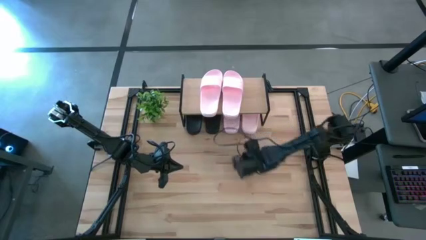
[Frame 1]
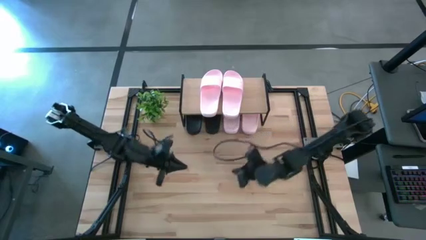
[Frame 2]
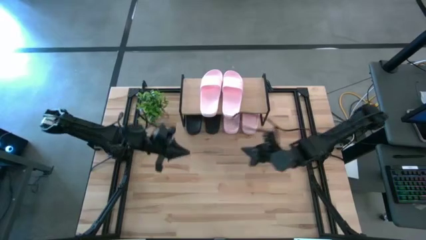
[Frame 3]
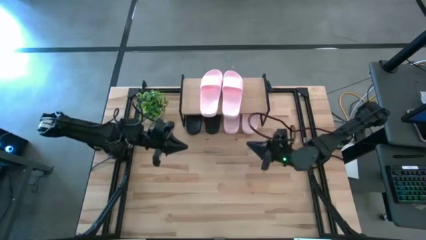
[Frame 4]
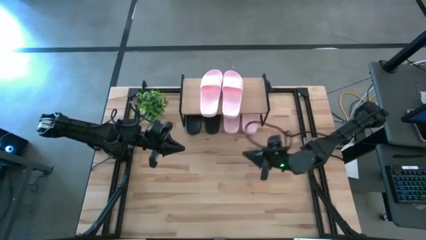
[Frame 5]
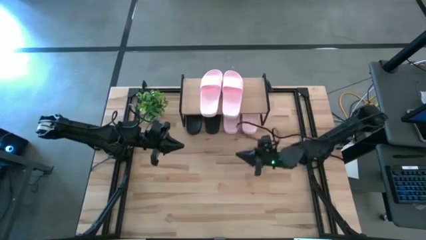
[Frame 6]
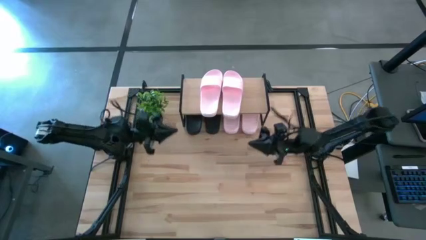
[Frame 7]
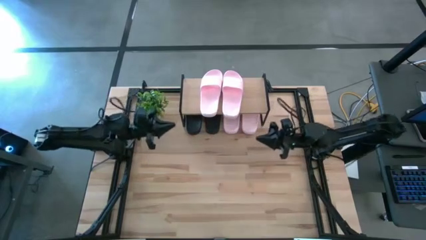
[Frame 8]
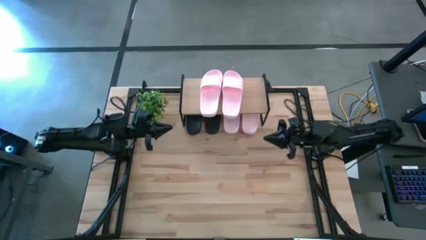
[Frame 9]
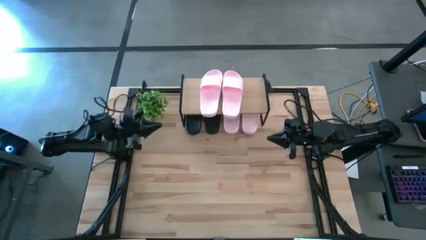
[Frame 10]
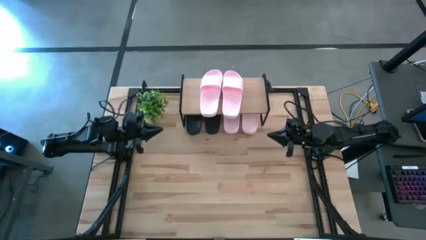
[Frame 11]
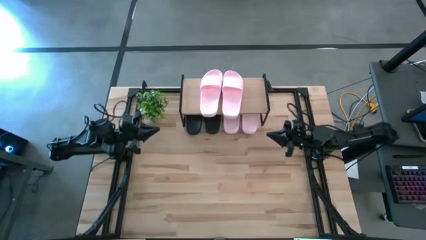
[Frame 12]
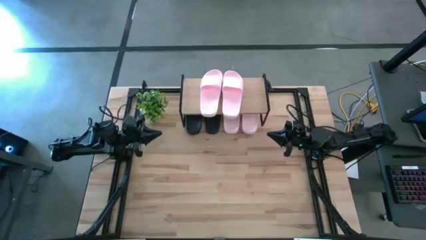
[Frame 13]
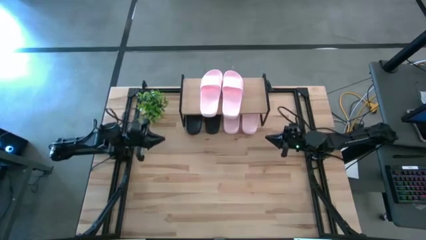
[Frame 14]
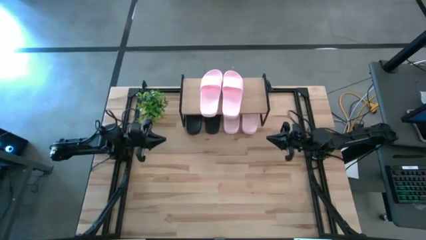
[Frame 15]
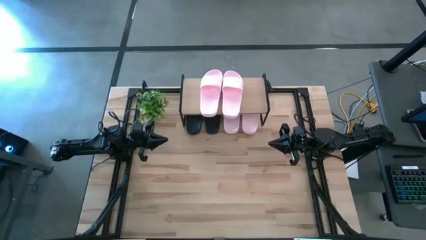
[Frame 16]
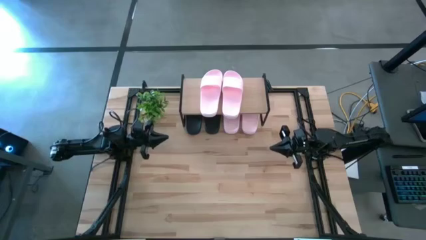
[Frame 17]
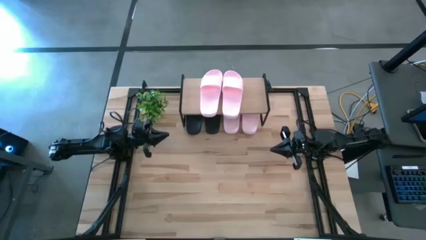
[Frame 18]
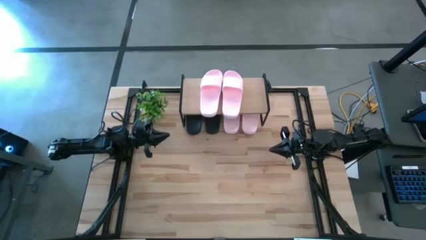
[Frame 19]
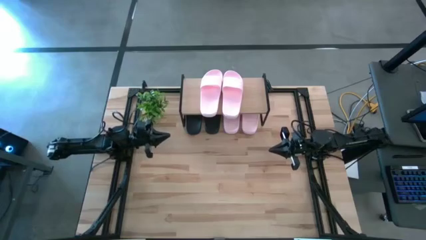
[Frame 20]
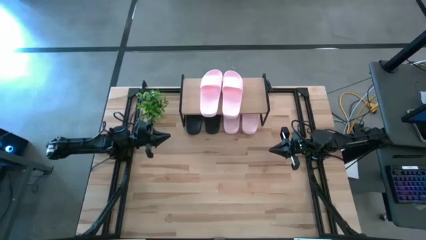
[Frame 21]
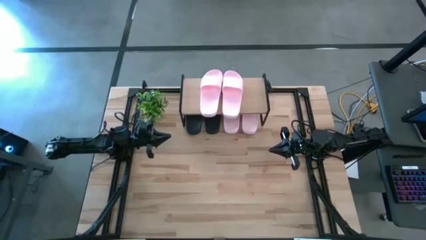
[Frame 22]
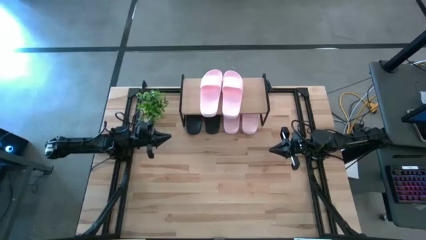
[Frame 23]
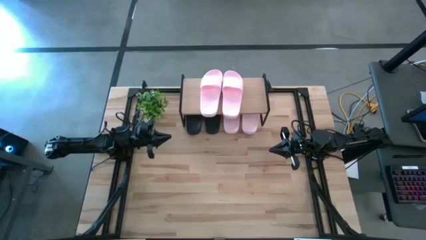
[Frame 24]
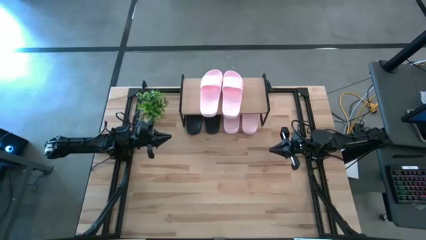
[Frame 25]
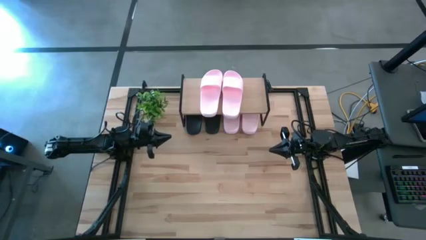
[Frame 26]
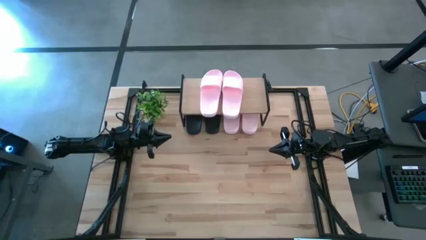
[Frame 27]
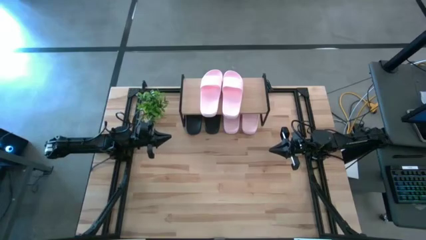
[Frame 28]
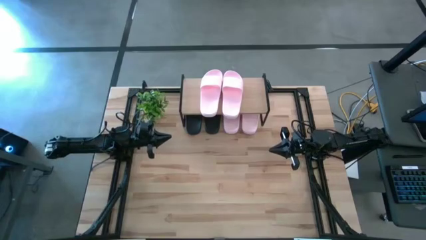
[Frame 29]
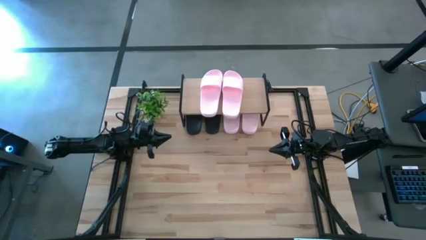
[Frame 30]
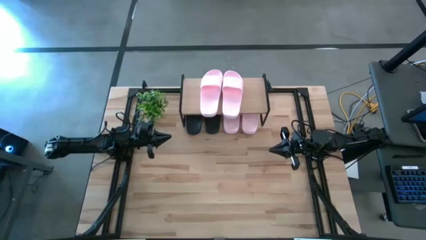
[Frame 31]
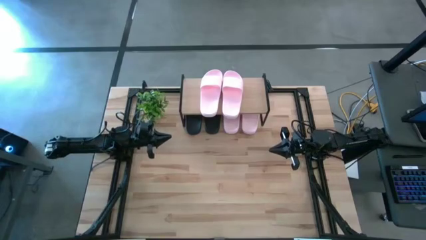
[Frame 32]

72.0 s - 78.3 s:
Task: Pick and place slides into the shelf
Return to Home Position

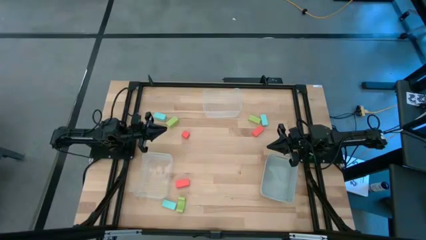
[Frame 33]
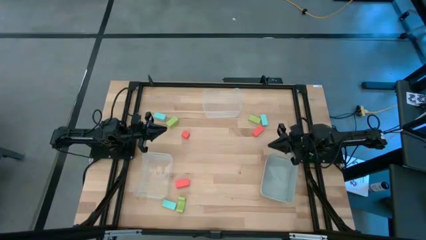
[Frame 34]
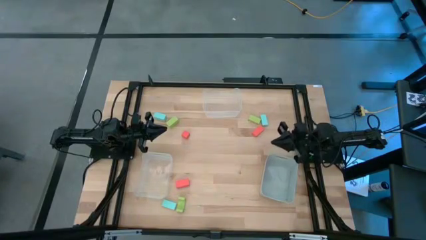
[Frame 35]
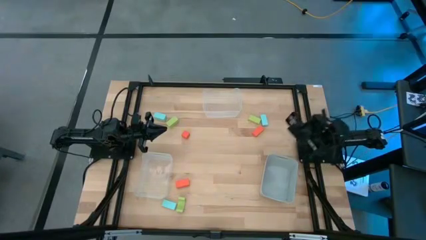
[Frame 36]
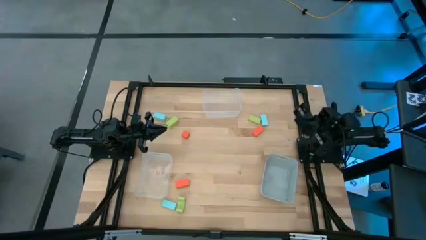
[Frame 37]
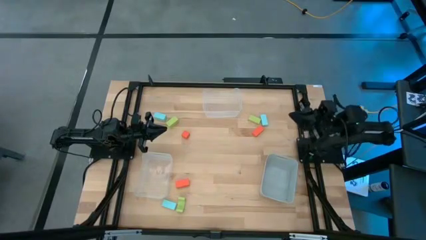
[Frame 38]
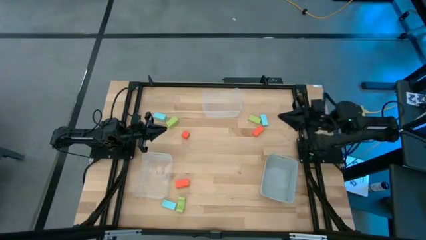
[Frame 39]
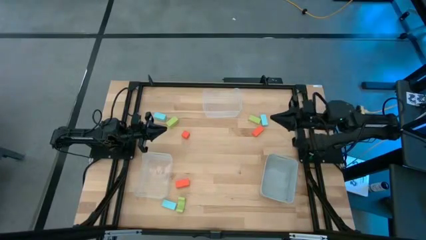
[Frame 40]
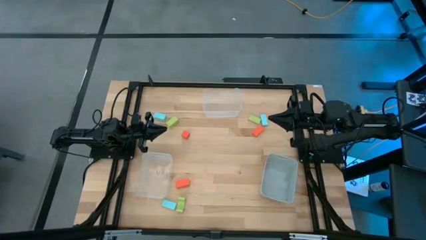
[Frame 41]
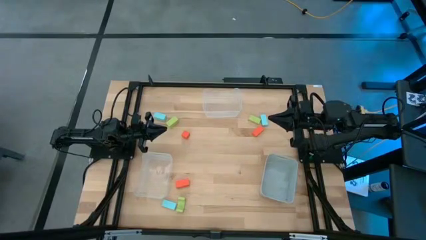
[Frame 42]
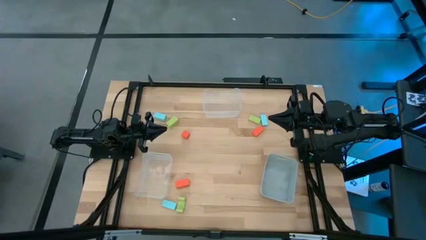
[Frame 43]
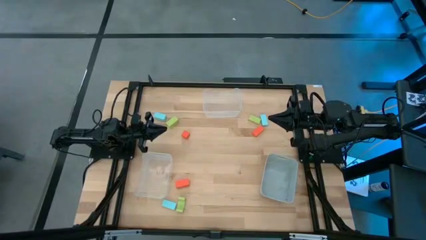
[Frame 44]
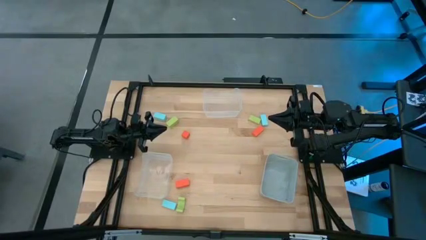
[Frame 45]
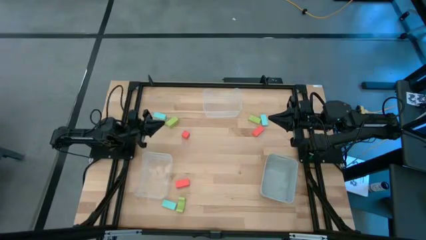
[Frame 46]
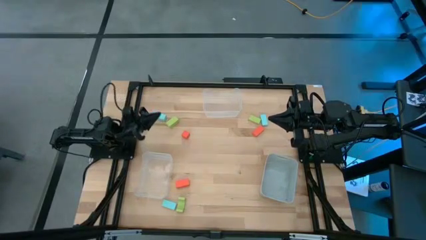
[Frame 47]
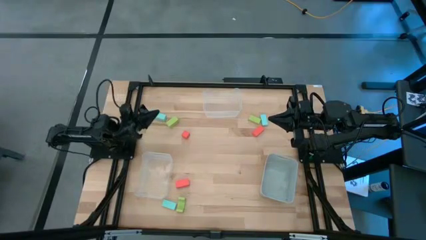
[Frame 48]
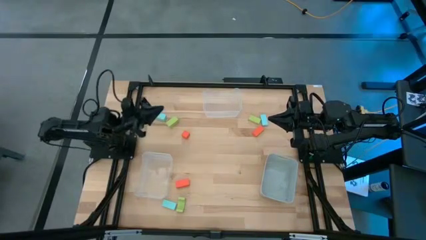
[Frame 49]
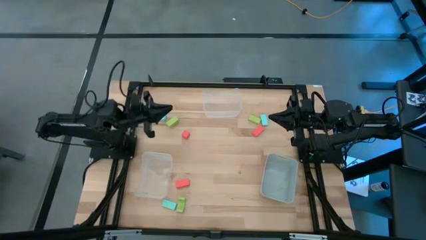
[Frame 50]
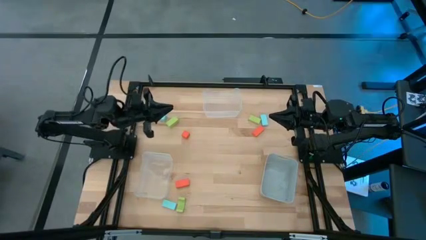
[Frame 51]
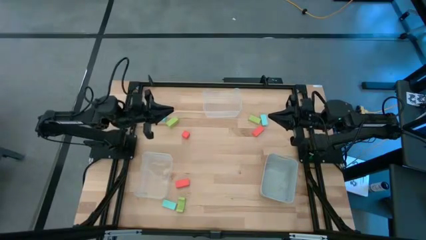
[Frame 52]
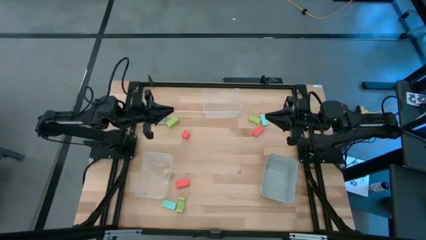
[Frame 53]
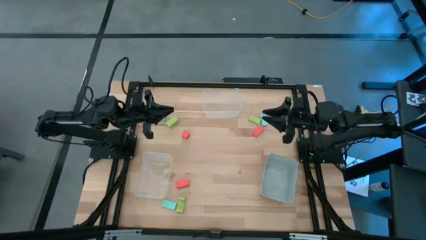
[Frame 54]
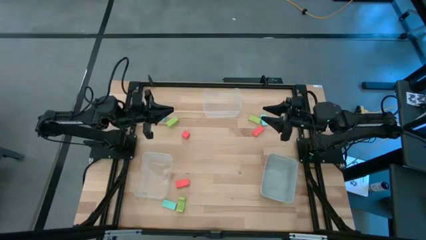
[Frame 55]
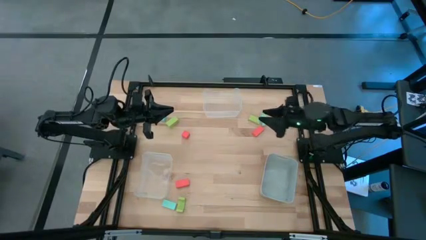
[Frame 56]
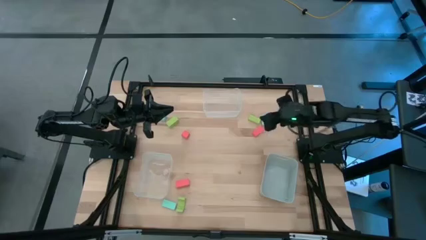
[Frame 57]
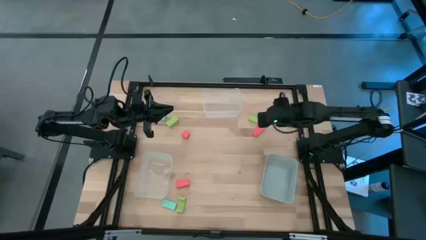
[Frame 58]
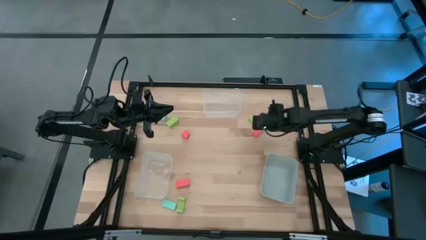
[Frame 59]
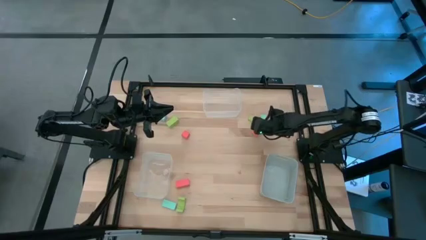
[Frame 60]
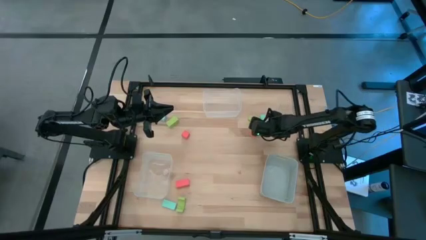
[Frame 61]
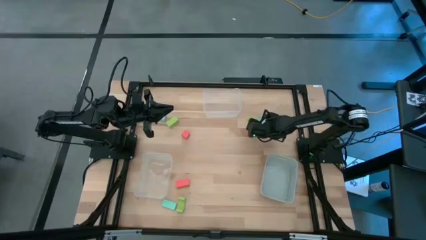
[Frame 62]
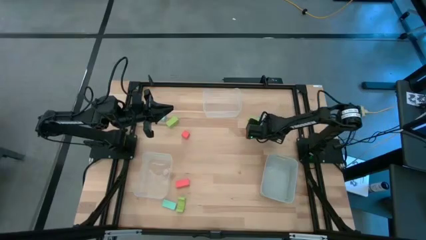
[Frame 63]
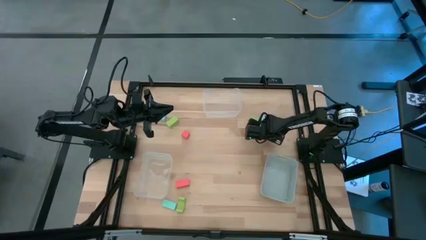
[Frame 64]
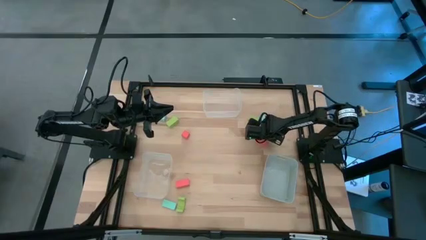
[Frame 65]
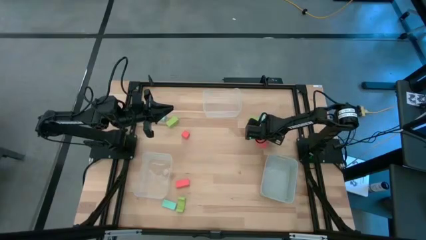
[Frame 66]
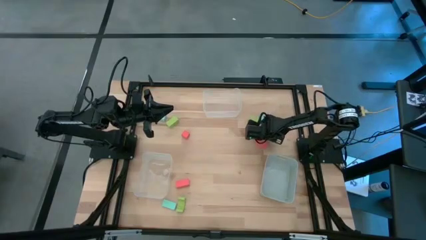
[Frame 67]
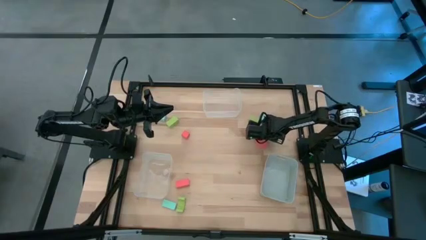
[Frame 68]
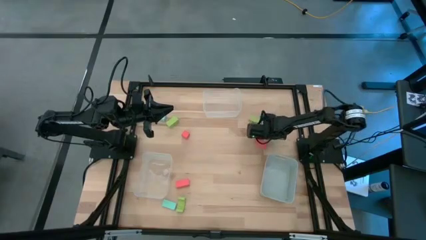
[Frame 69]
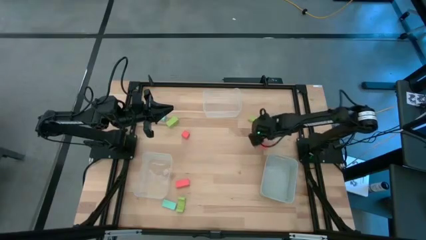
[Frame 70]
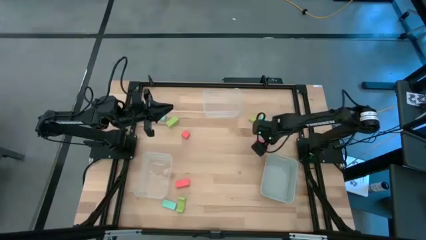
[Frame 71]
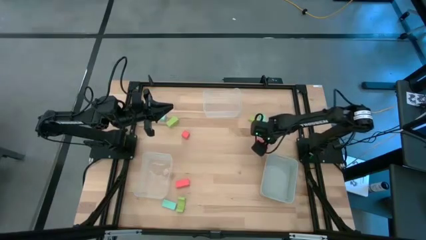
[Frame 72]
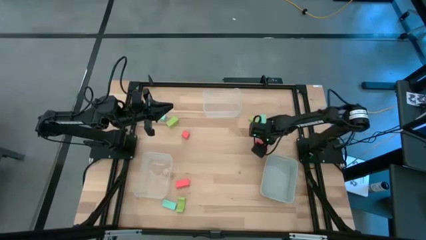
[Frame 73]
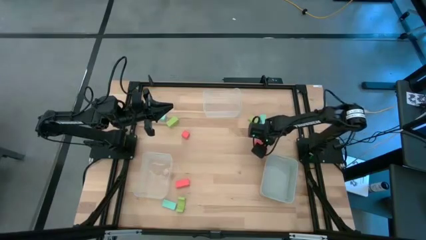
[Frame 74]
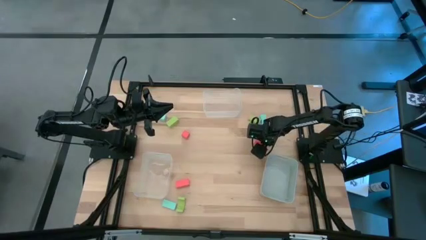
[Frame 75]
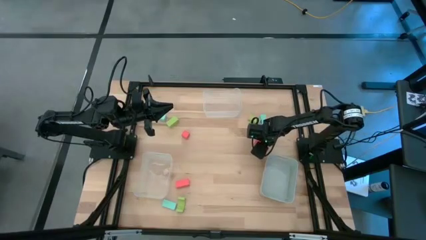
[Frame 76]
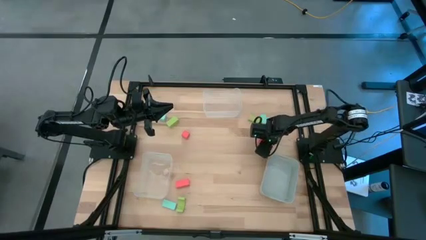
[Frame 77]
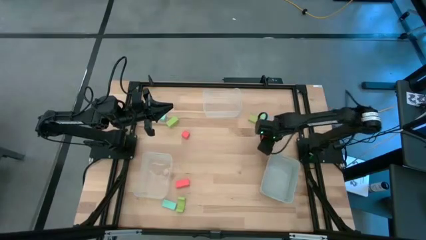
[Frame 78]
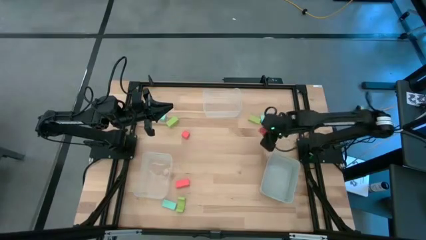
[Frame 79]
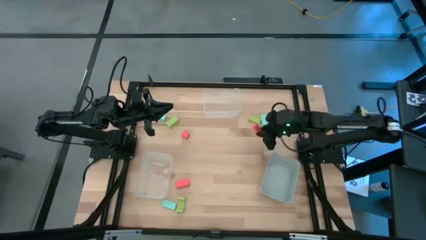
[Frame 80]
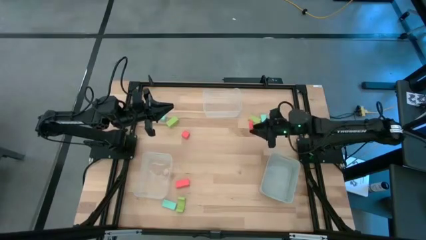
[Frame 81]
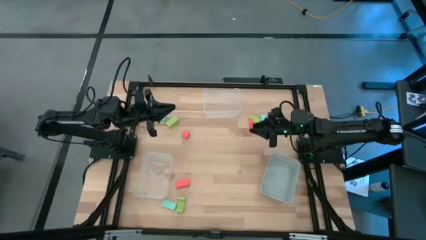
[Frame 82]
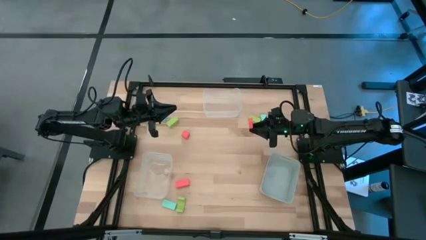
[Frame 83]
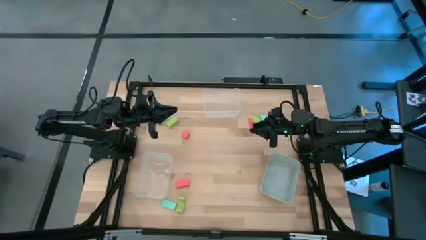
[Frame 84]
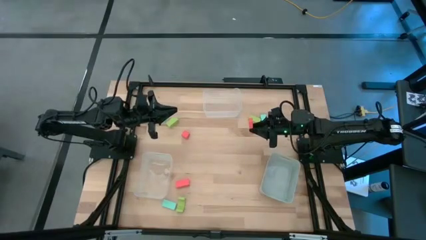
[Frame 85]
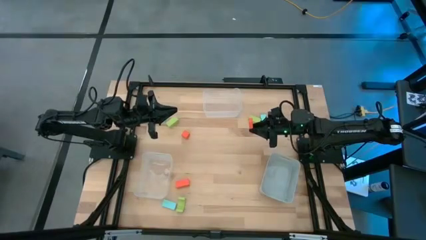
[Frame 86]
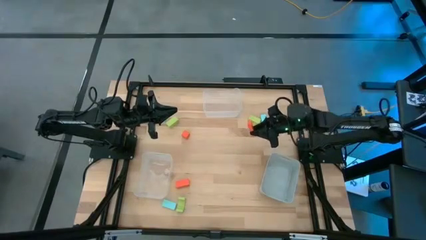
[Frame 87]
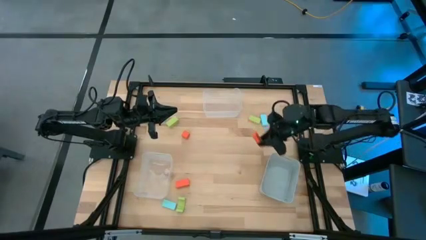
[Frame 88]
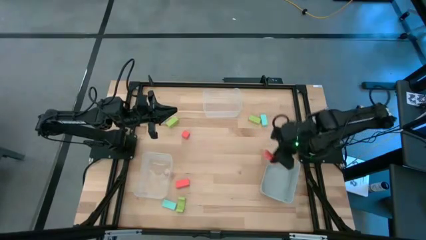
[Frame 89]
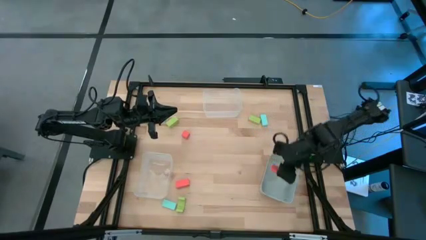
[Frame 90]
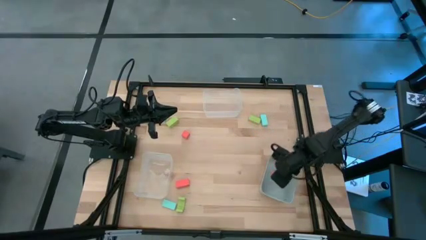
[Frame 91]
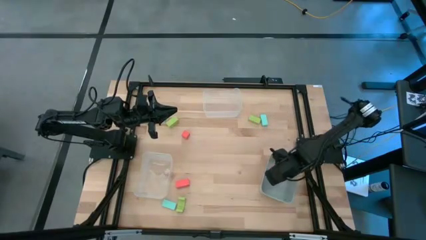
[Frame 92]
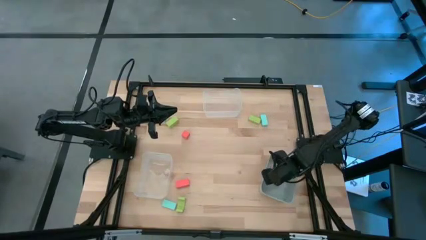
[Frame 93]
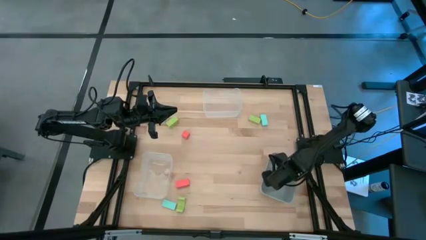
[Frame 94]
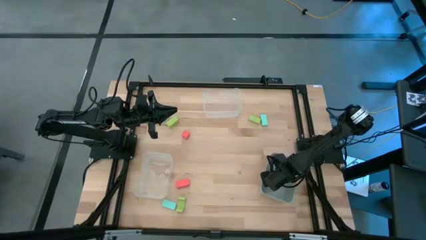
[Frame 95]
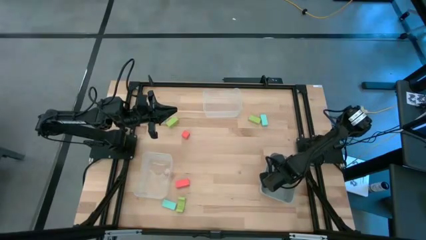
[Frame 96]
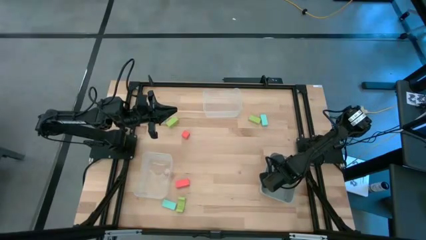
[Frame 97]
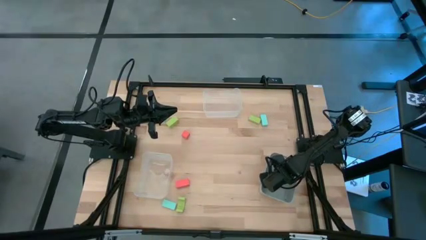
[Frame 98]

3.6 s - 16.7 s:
Task: Sort & place blocks by color
Put the top right orange block into the gray bin
